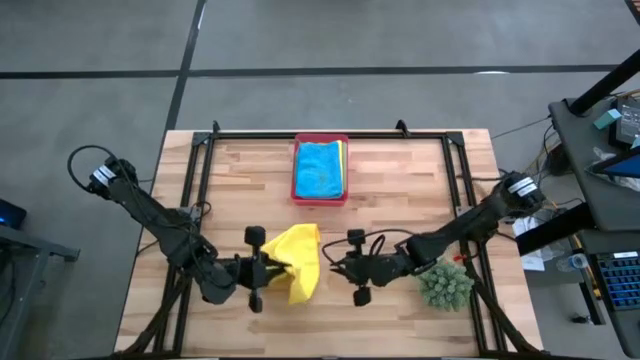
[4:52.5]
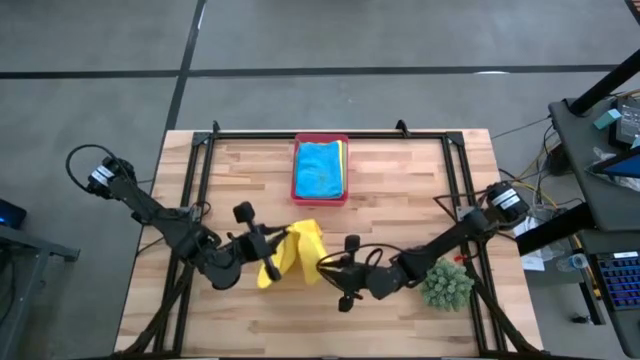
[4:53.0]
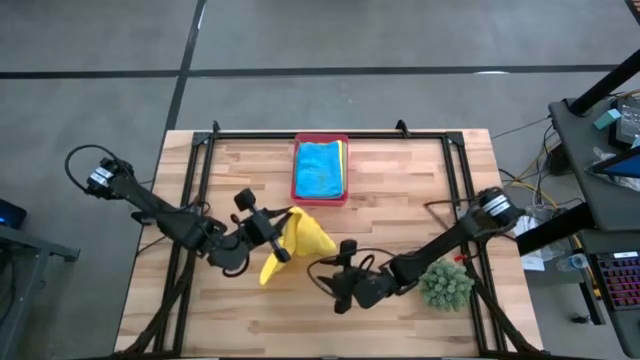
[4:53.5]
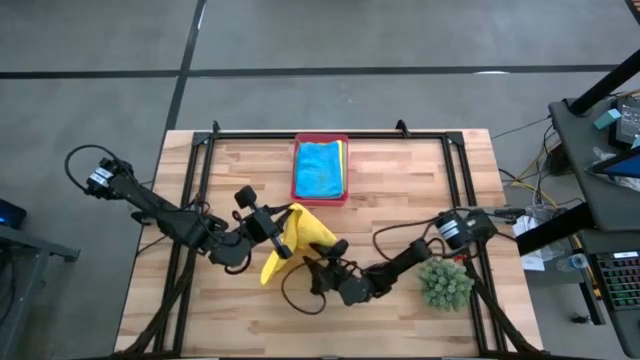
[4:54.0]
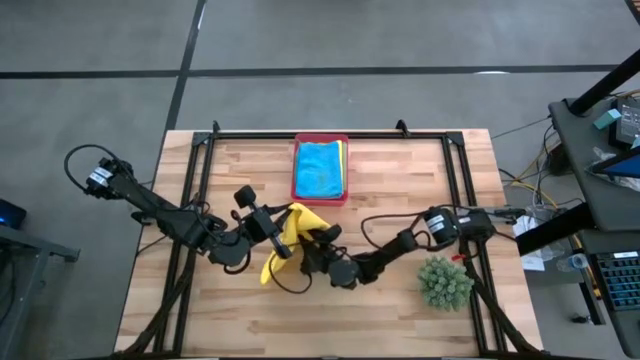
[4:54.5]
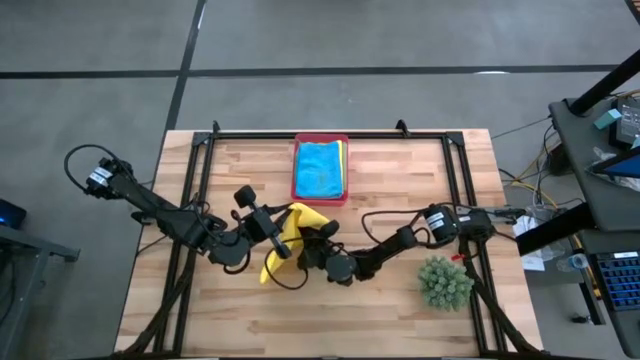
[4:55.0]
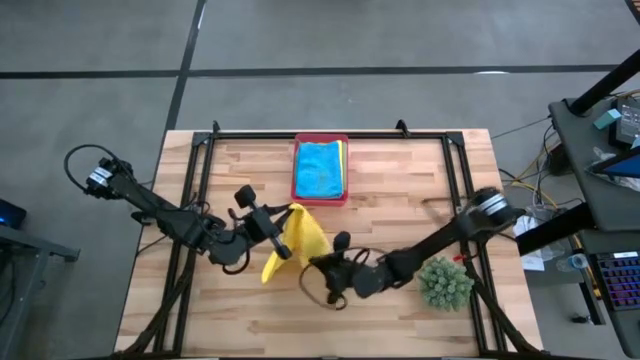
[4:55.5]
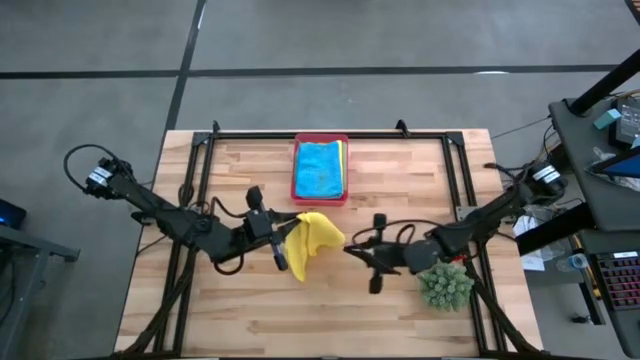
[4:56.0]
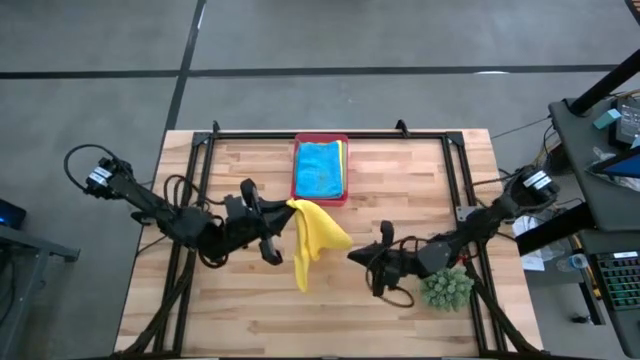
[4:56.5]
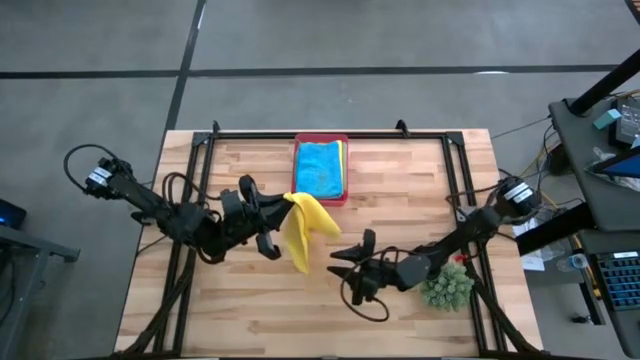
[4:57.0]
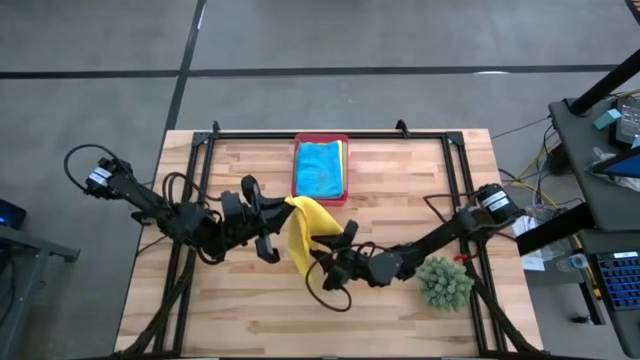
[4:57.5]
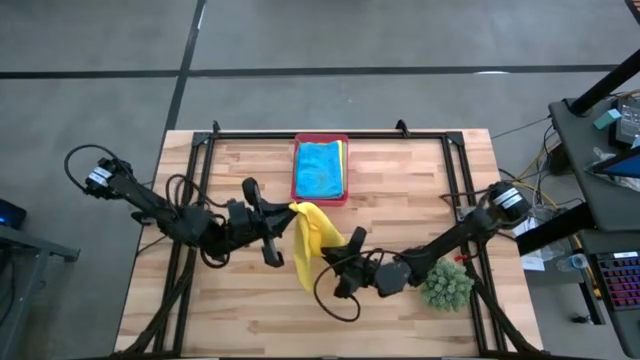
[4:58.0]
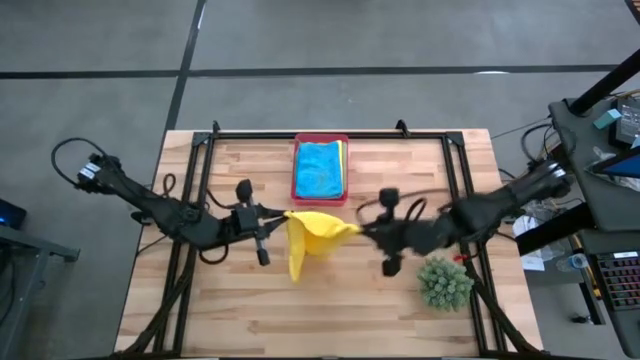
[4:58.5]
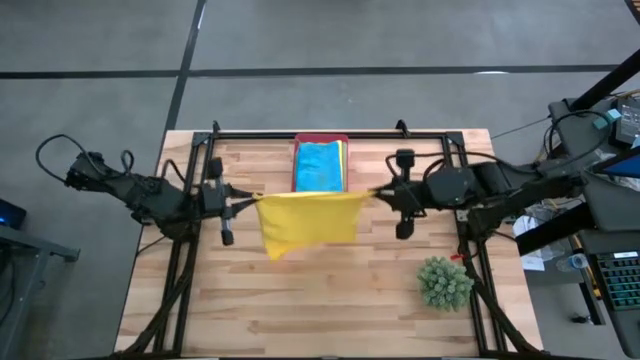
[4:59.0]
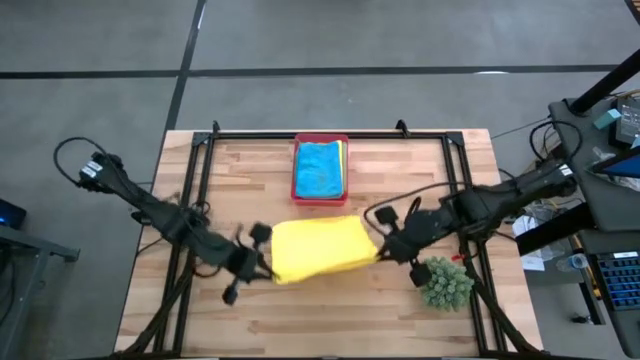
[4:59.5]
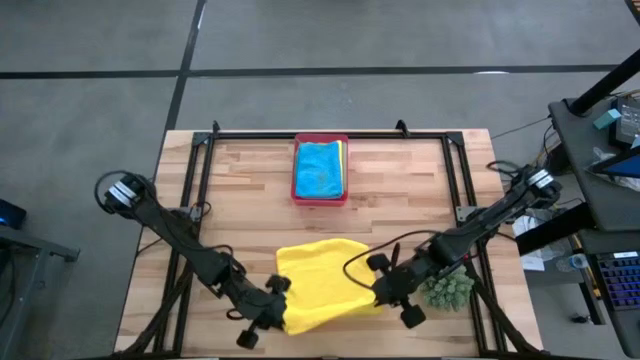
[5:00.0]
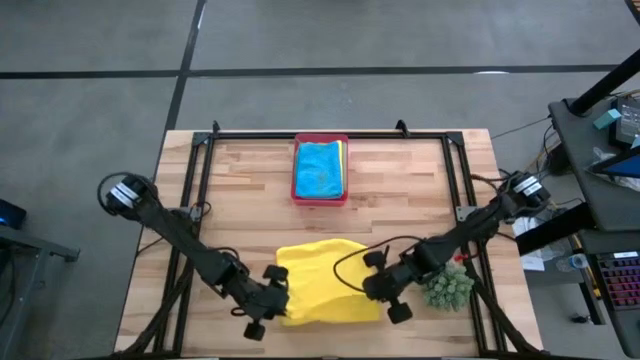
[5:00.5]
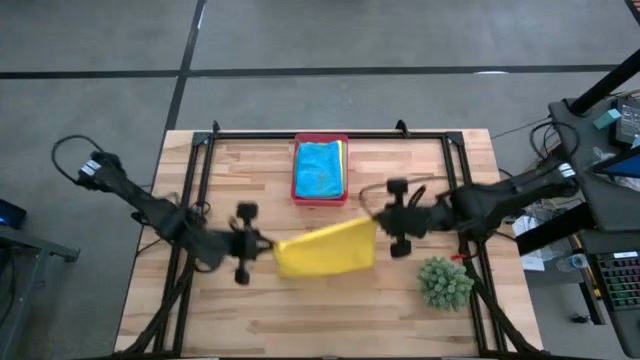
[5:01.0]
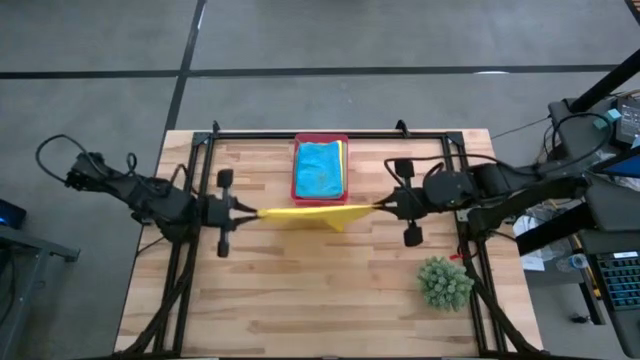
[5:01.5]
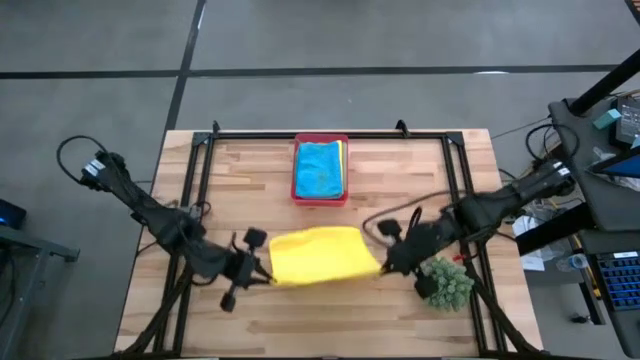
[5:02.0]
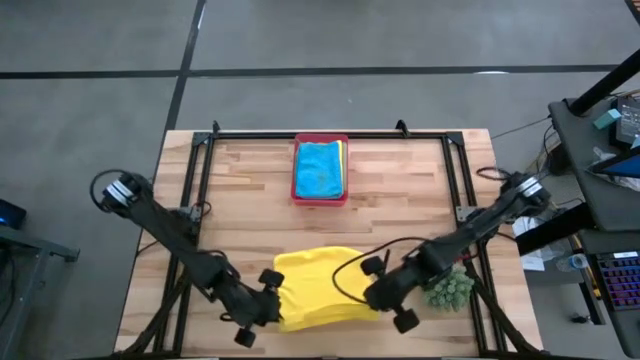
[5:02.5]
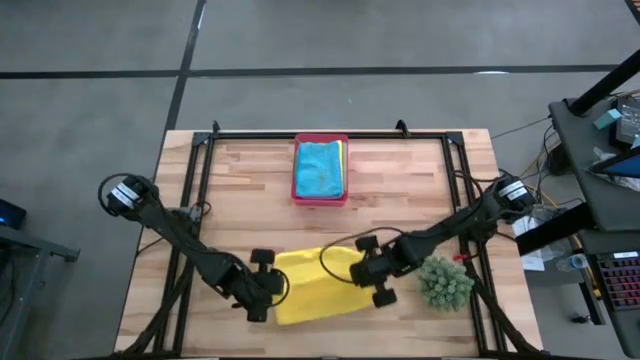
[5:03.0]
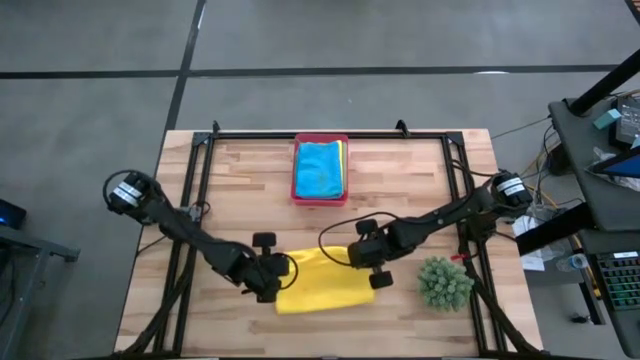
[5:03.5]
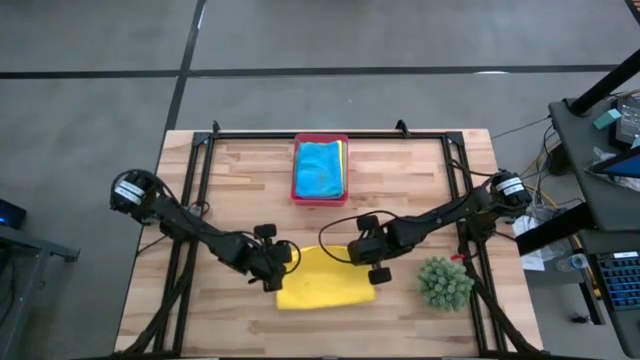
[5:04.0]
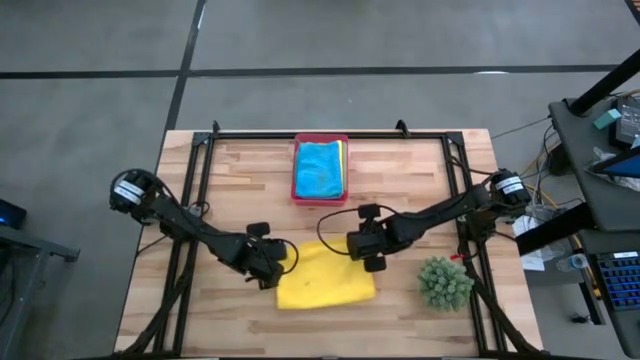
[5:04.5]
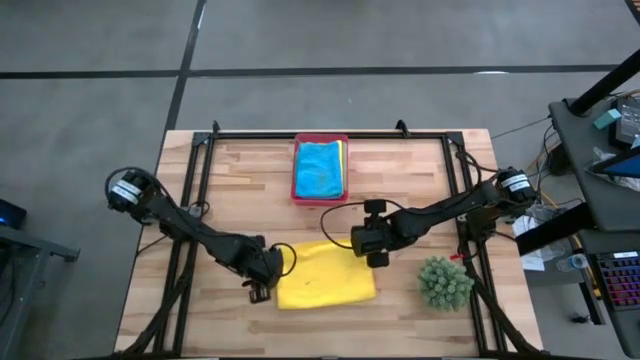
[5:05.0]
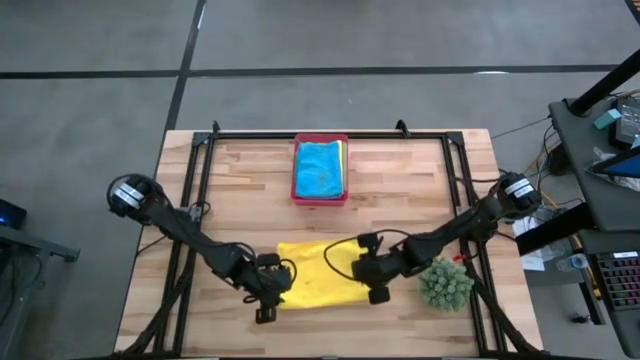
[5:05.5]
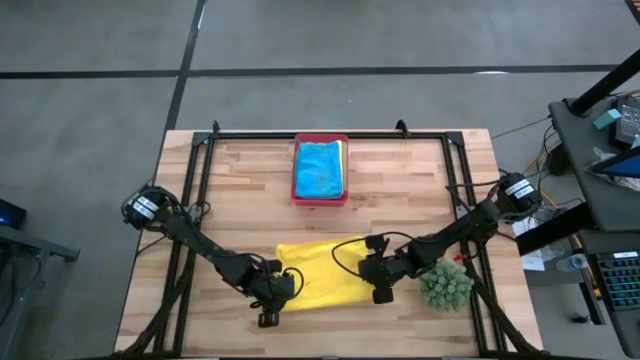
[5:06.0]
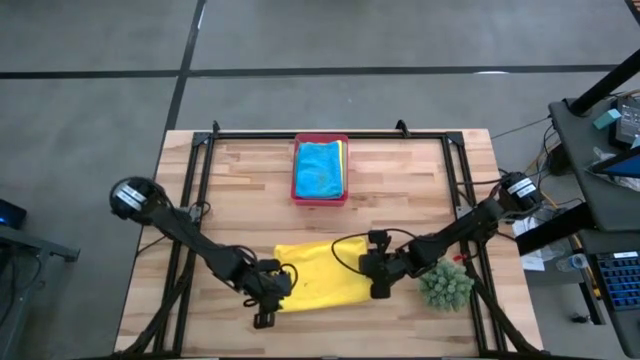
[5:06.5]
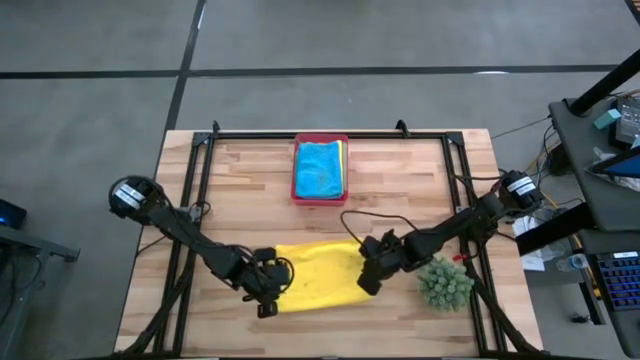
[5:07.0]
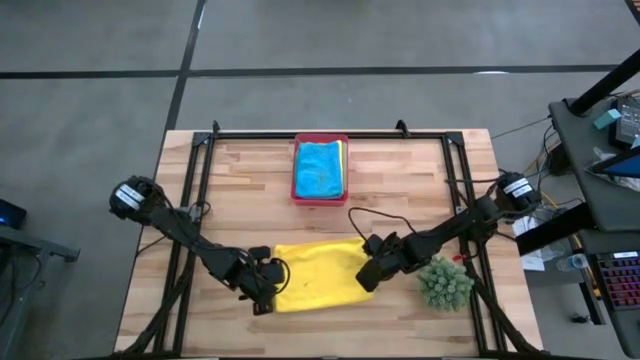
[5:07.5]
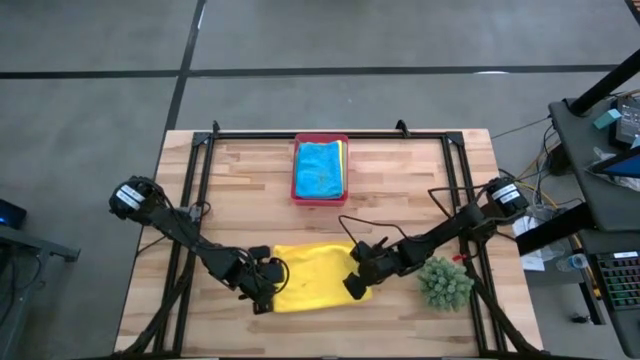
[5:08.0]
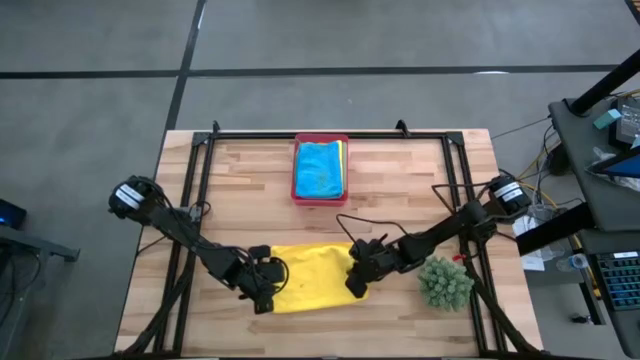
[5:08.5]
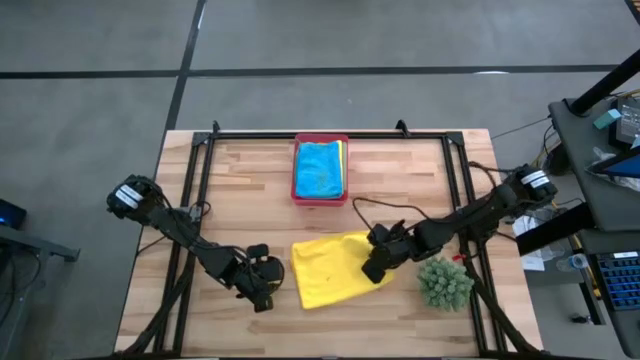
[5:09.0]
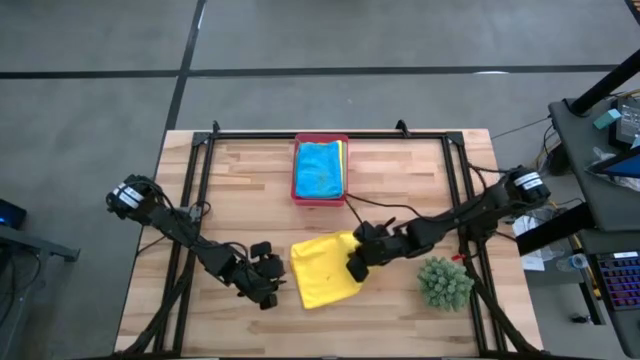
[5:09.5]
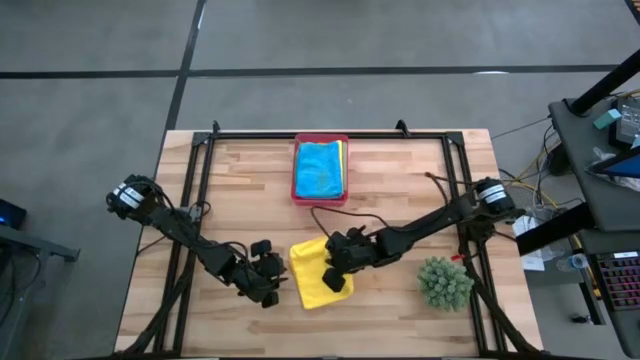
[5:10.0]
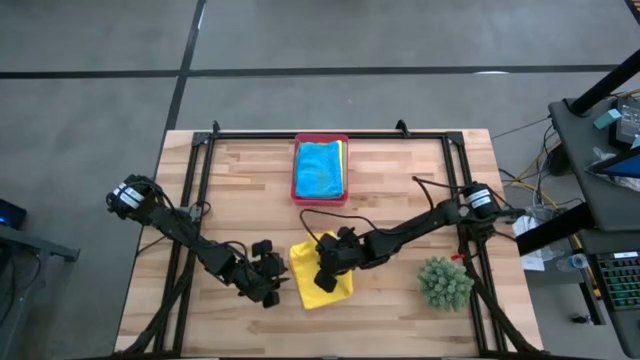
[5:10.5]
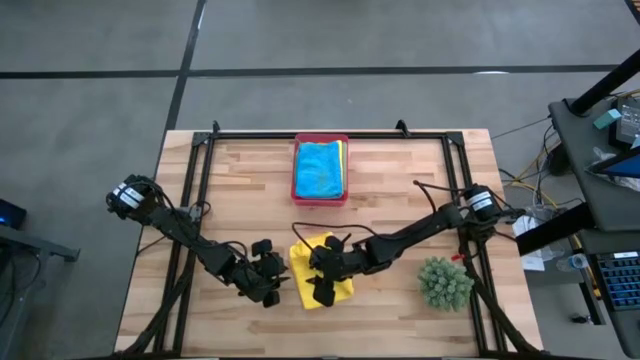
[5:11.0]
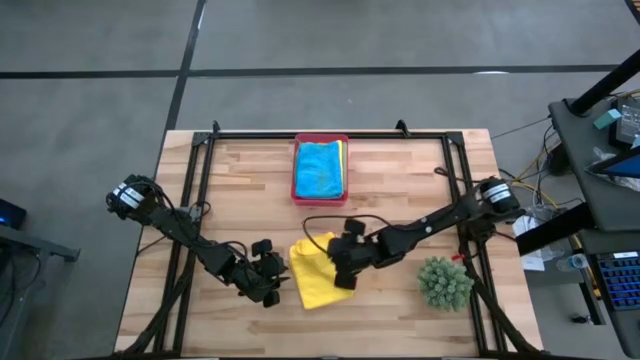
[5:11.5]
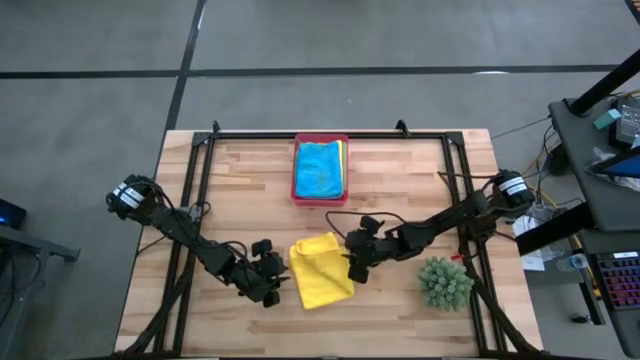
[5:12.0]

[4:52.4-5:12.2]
Task: Fold microfiber towels
Fold the yellow towel
